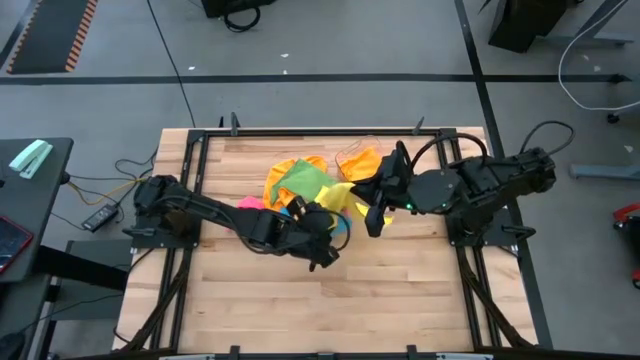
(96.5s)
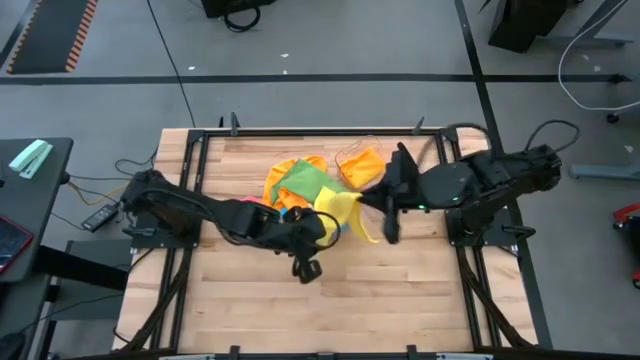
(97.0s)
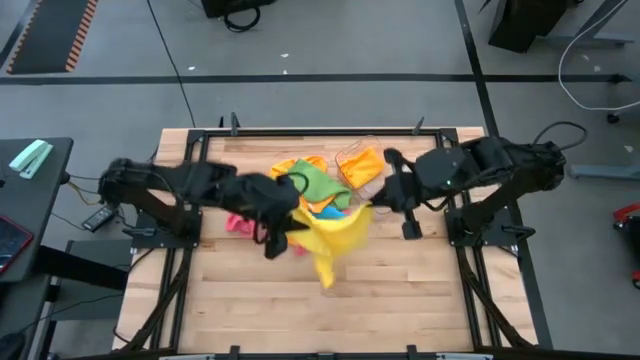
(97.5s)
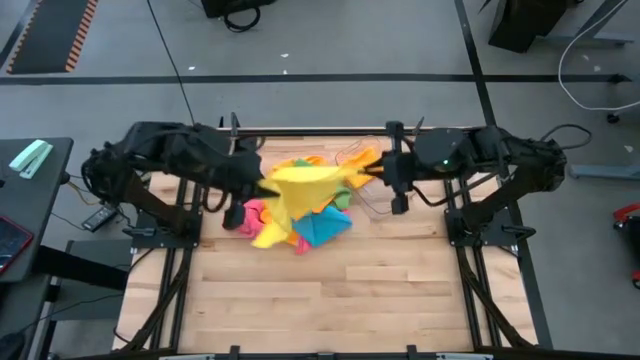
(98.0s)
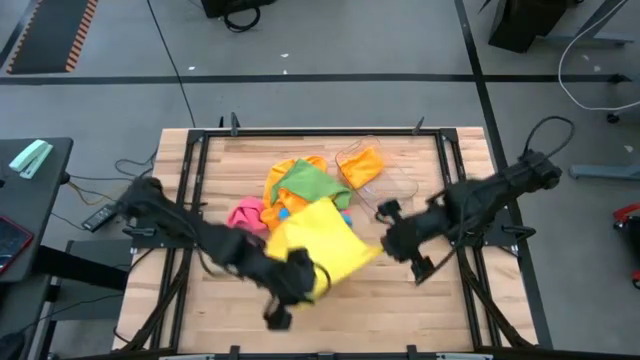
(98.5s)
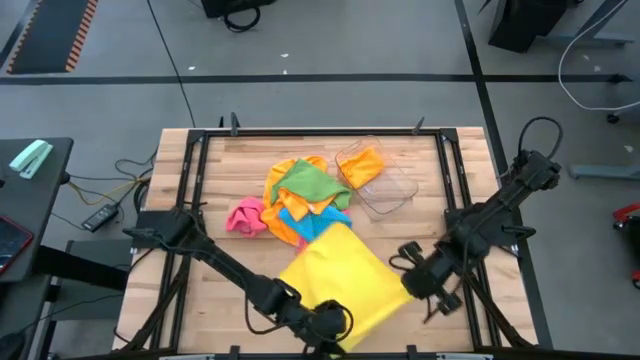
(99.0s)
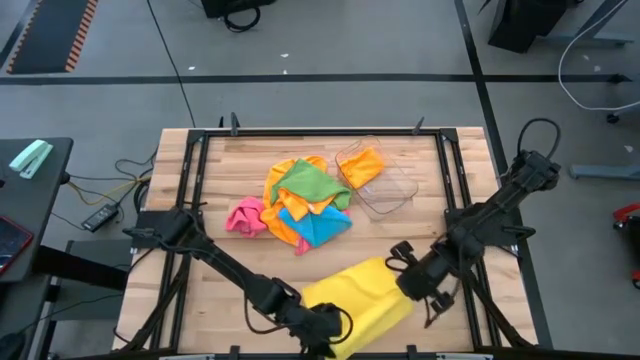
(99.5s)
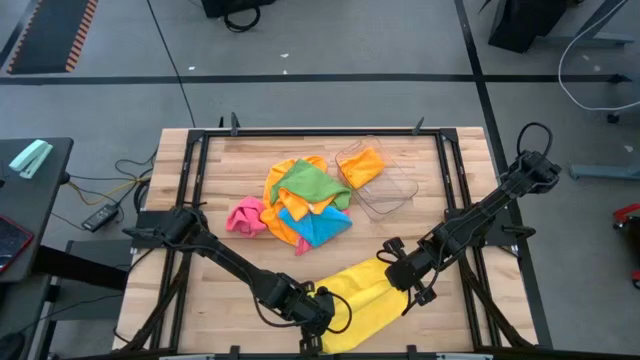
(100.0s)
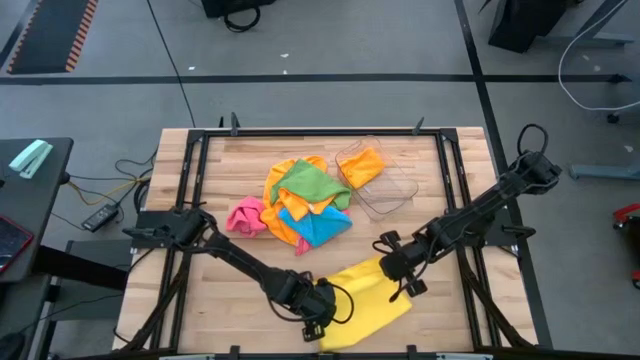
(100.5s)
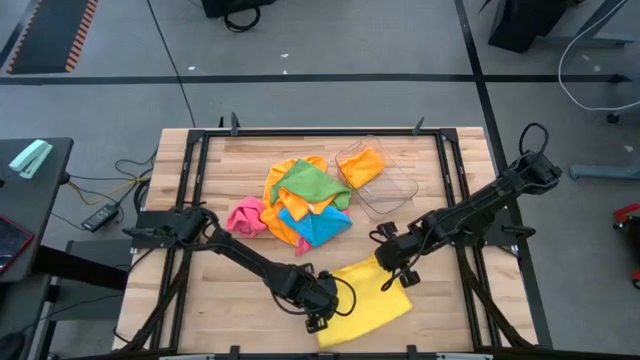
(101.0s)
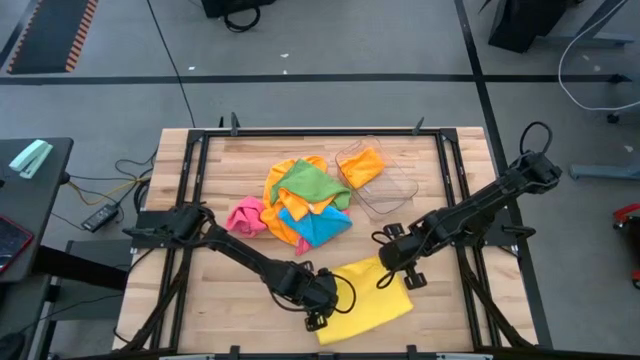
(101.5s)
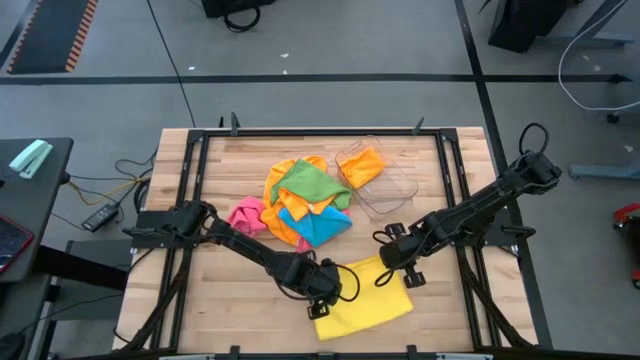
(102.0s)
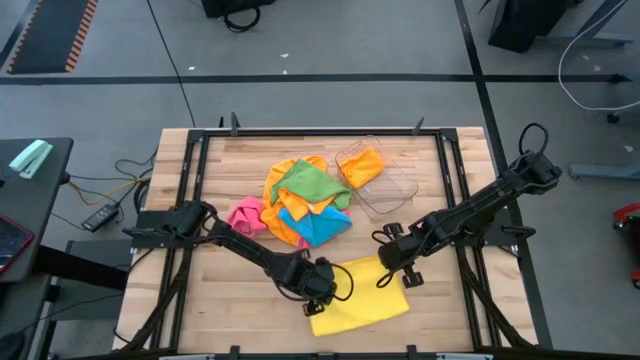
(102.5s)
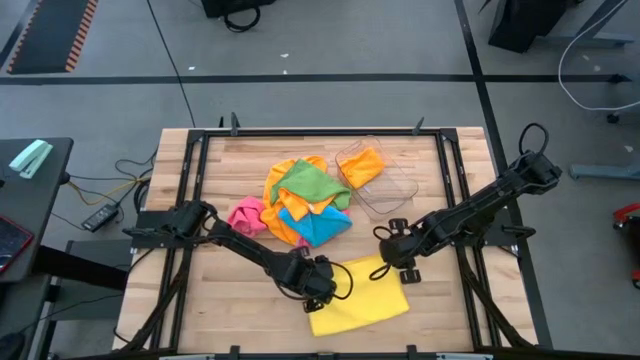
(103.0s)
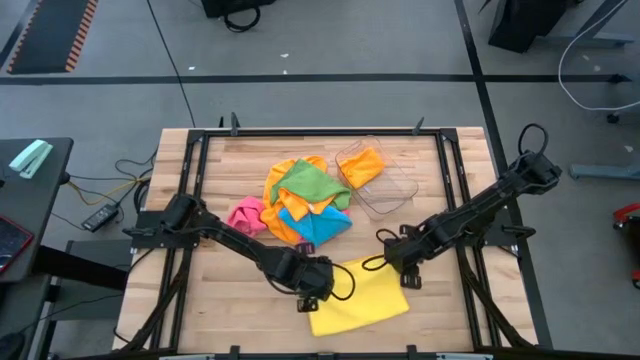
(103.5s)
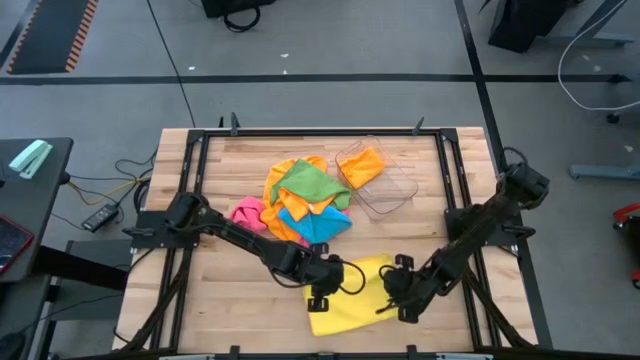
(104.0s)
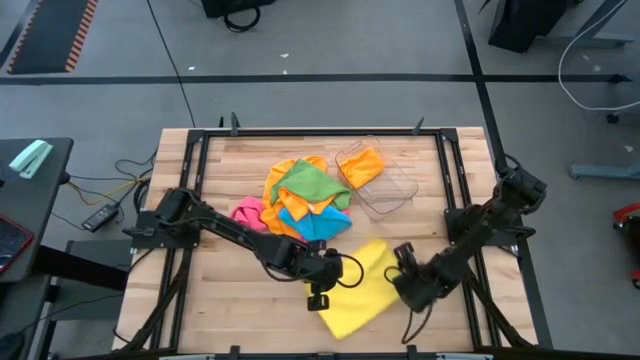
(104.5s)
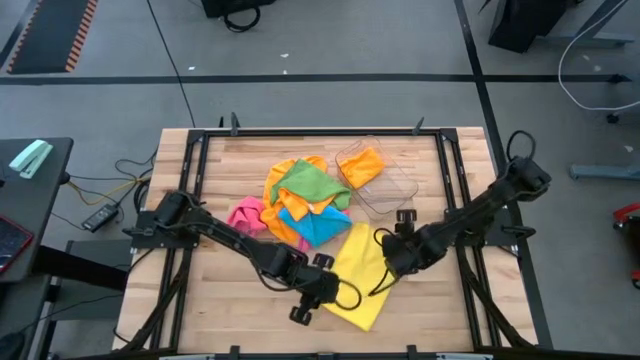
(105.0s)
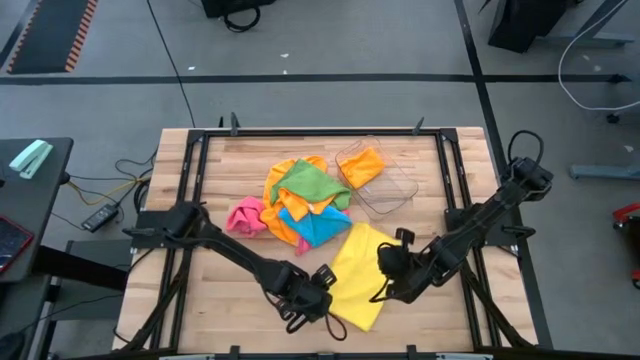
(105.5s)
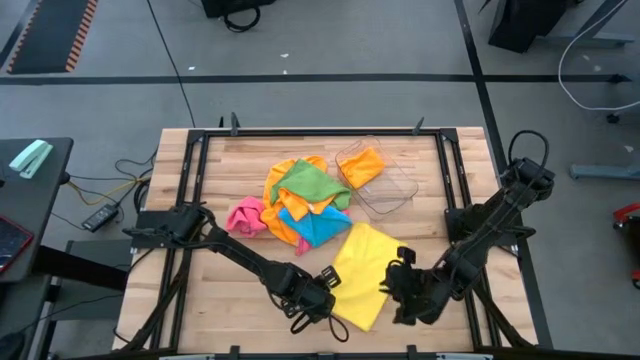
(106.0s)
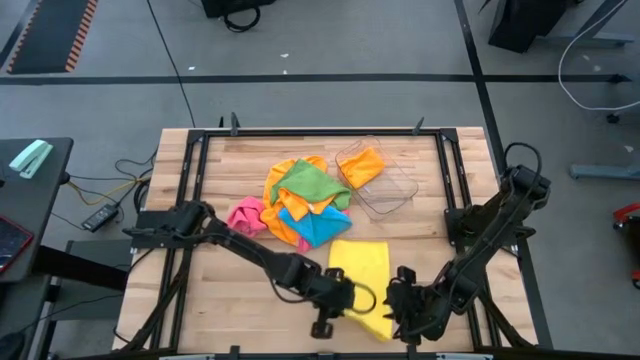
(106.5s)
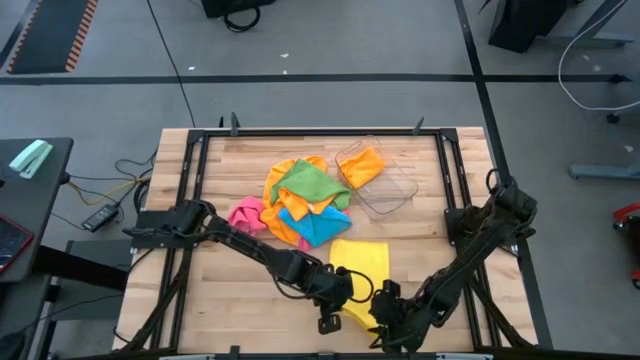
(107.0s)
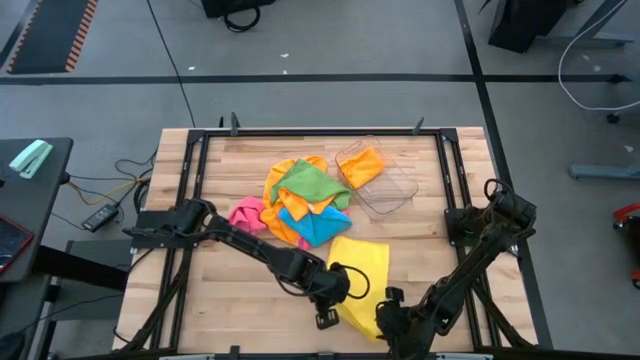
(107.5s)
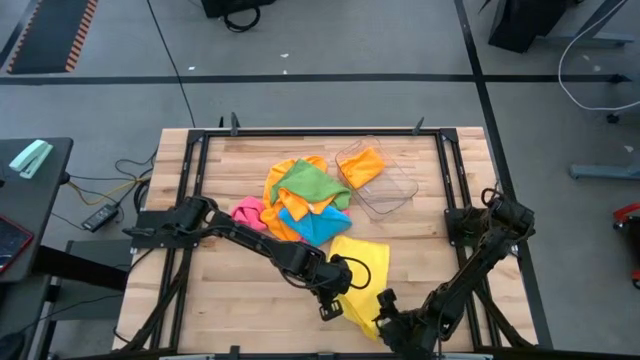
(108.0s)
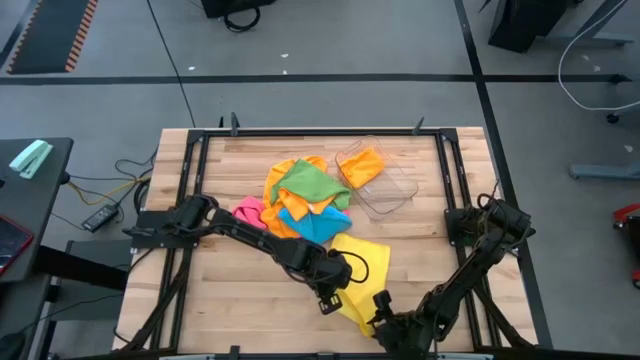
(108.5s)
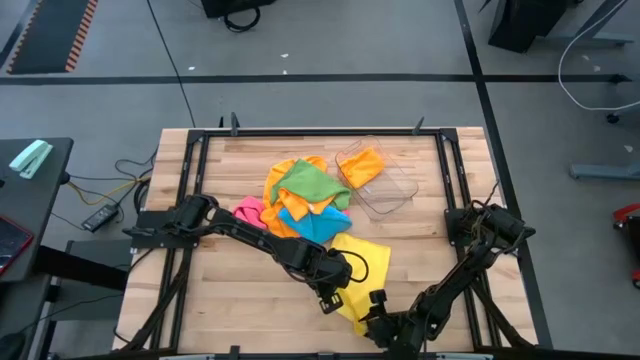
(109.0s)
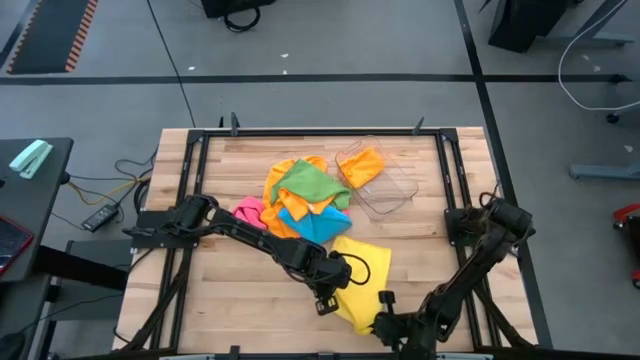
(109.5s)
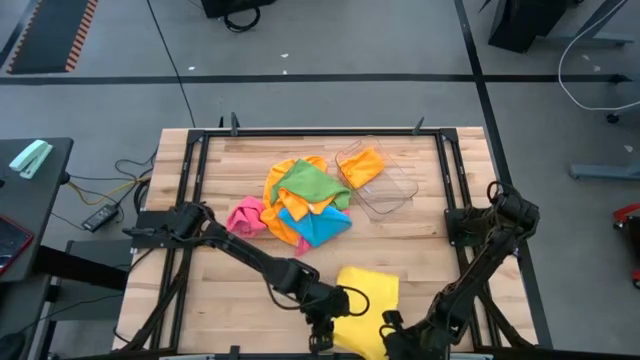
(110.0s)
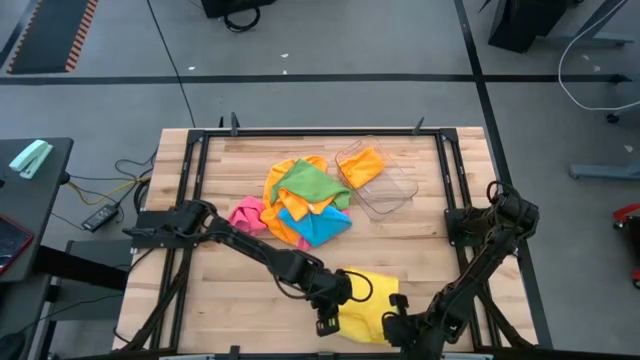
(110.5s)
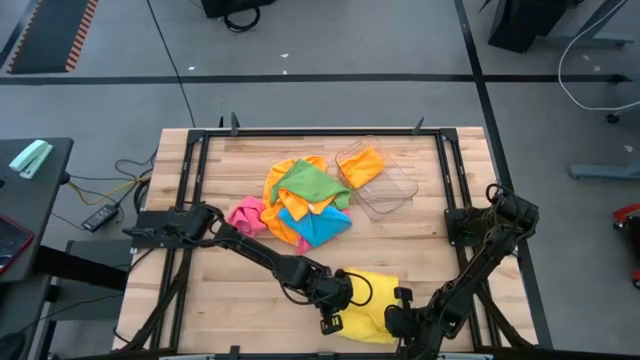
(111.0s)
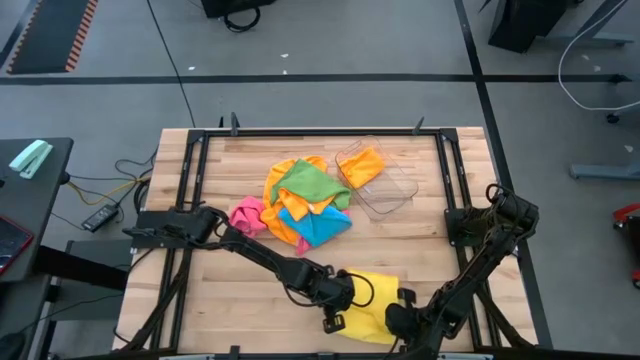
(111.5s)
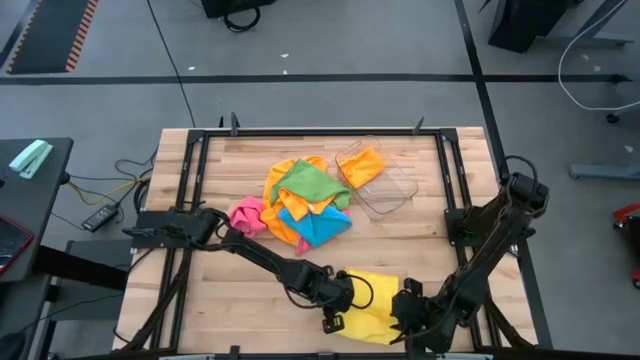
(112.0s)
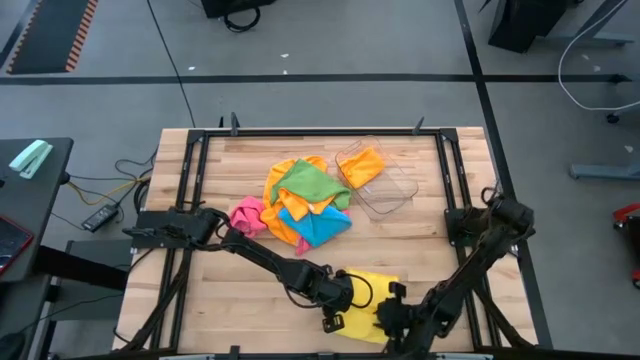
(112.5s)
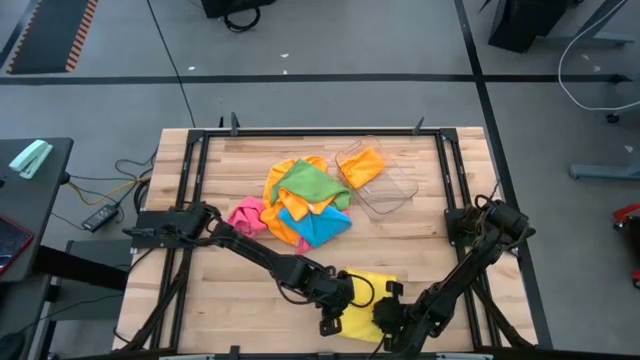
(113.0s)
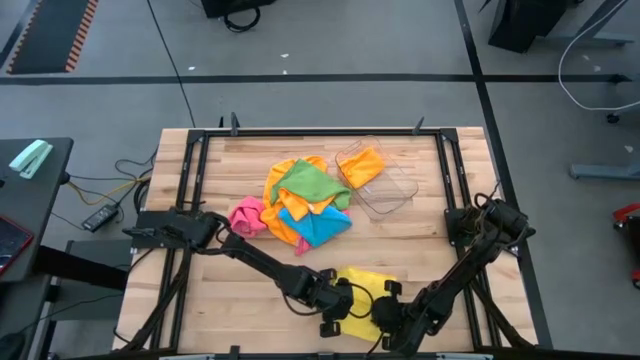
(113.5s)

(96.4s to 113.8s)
Task: Fold microfiber towels
Fold the yellow towel

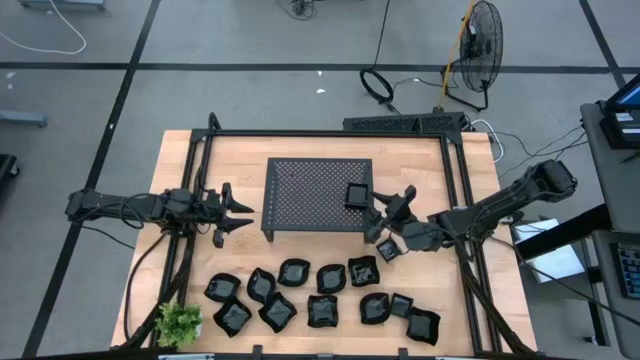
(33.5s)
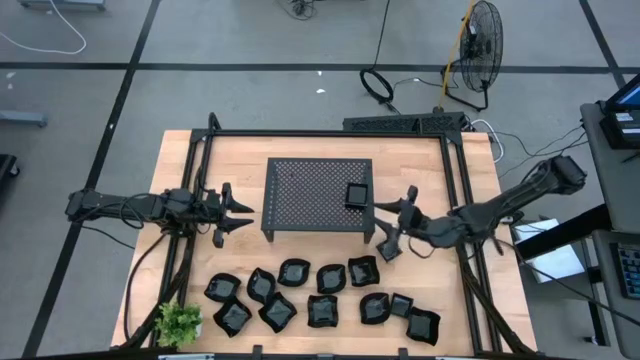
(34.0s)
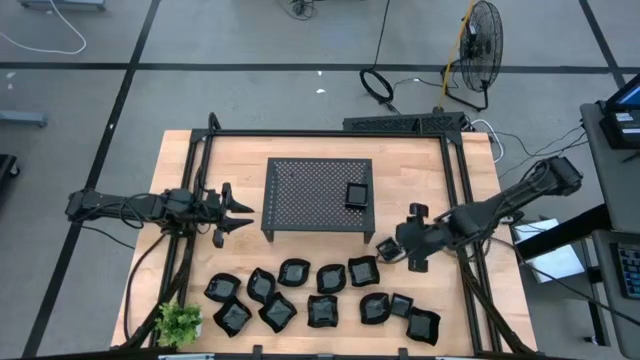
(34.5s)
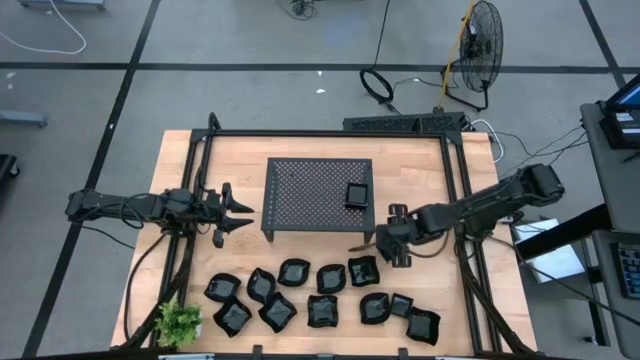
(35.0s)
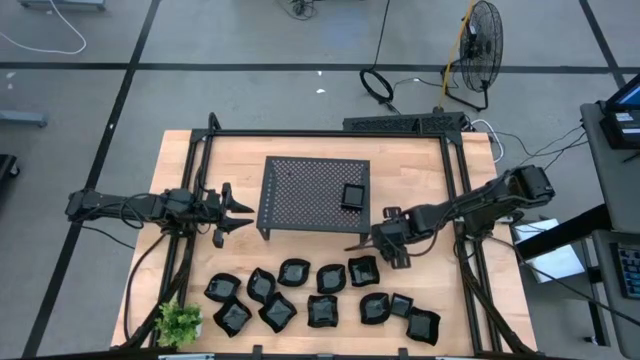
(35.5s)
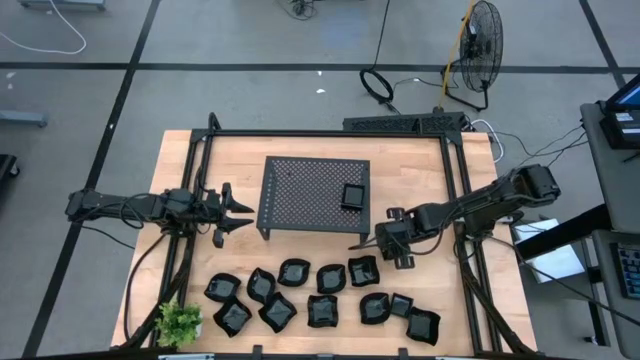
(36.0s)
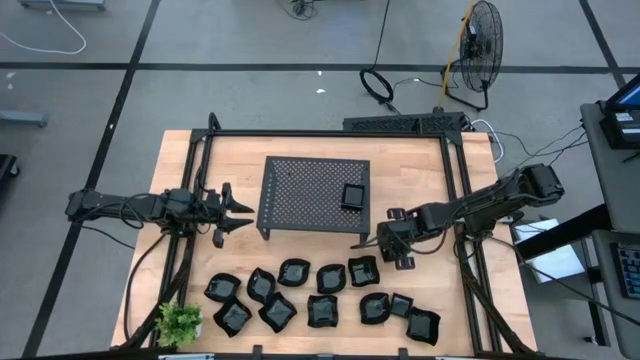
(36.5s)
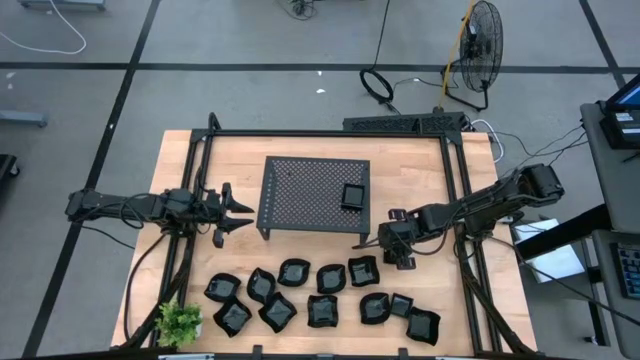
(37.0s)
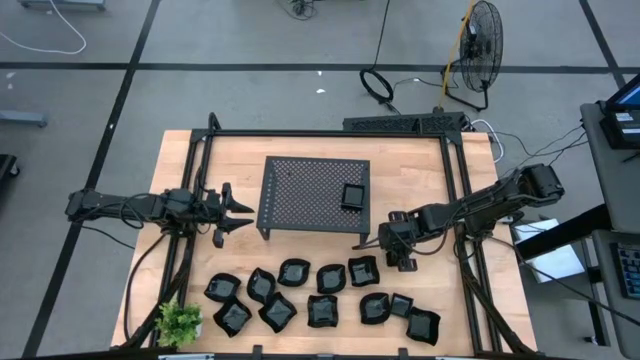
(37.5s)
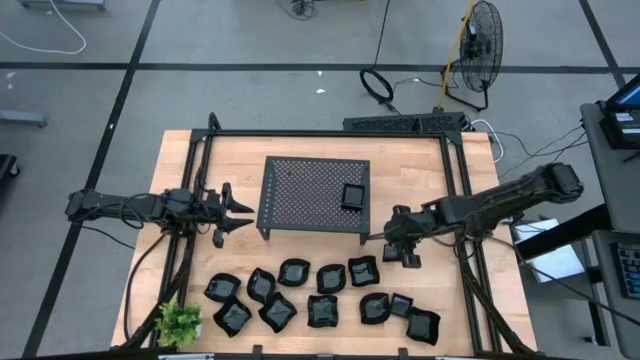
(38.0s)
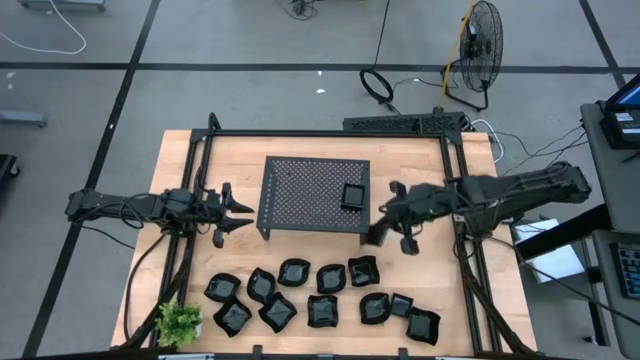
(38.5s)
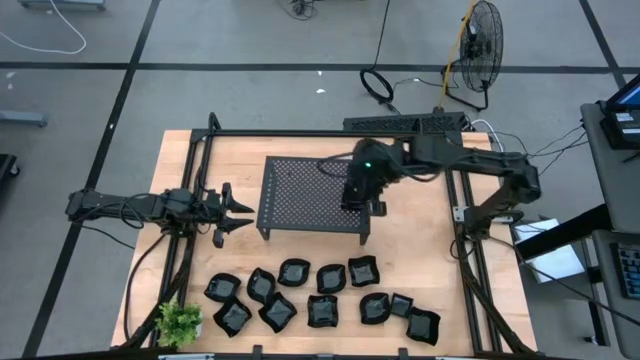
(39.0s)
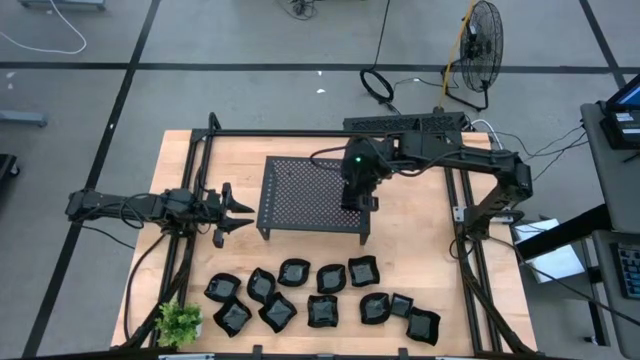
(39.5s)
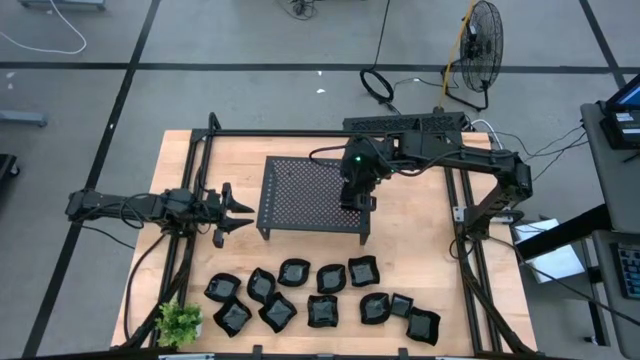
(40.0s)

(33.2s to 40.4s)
Task: Pick & Place Mini shaped plates
Stack the square plate onto the stacked square plate on the shelf
